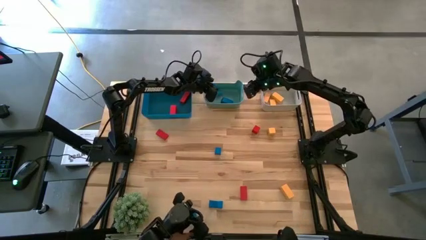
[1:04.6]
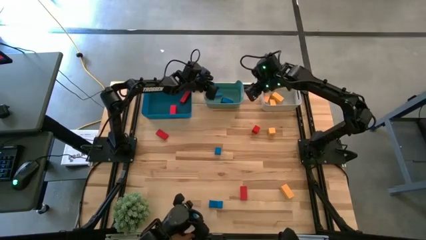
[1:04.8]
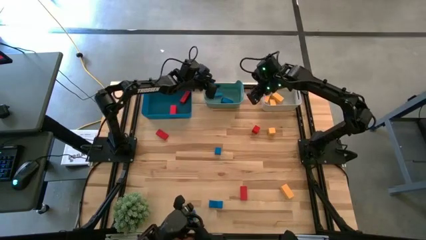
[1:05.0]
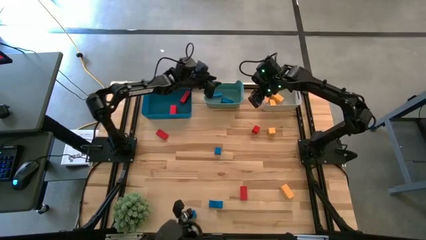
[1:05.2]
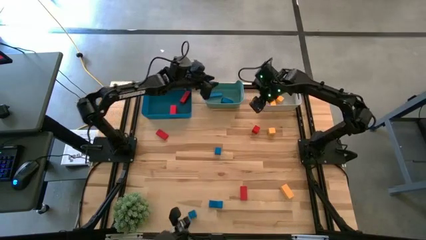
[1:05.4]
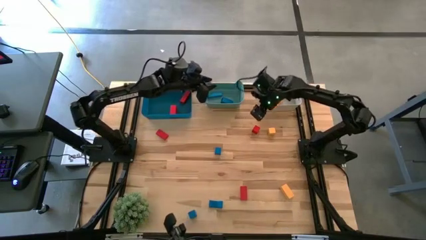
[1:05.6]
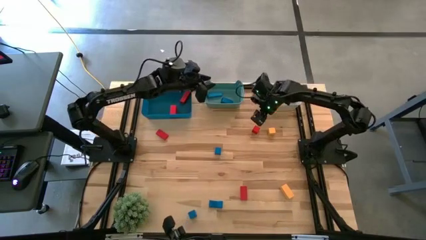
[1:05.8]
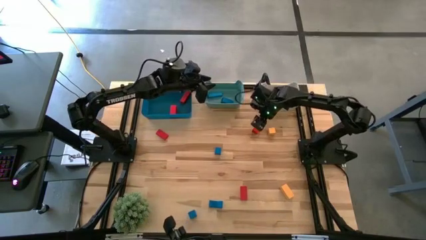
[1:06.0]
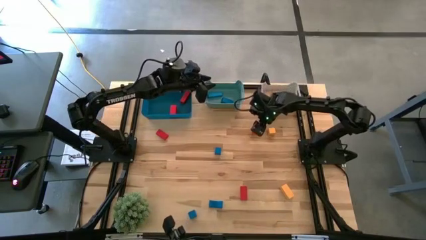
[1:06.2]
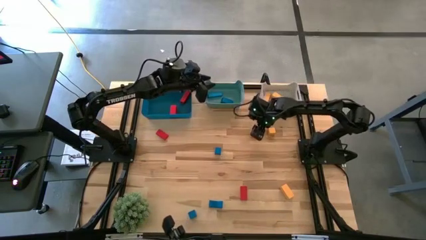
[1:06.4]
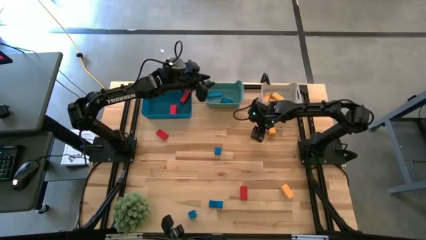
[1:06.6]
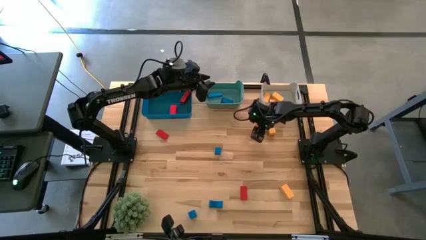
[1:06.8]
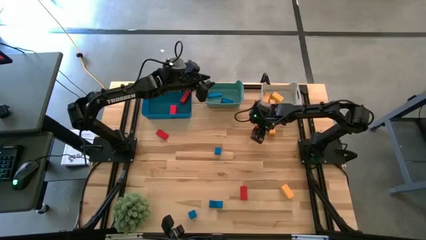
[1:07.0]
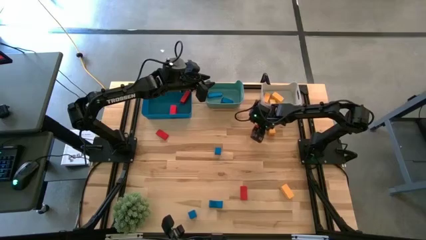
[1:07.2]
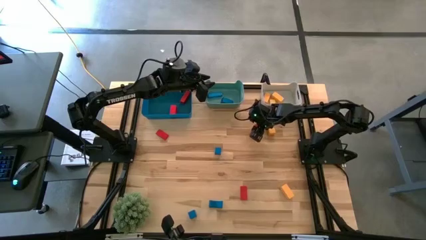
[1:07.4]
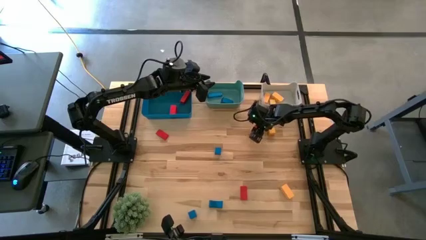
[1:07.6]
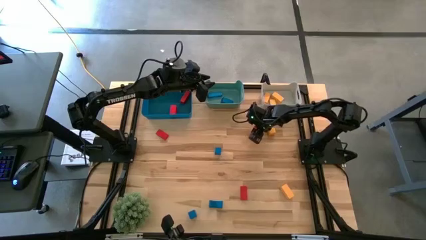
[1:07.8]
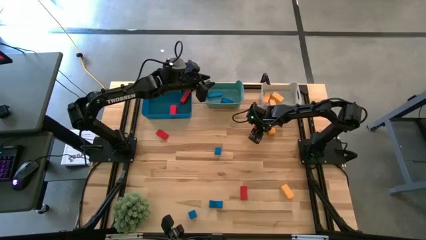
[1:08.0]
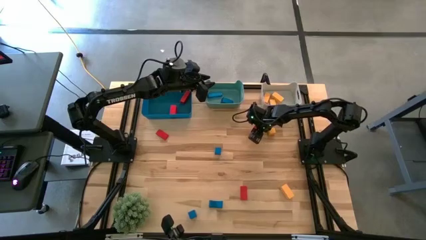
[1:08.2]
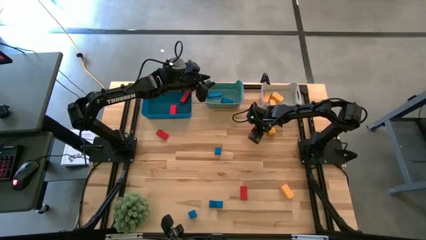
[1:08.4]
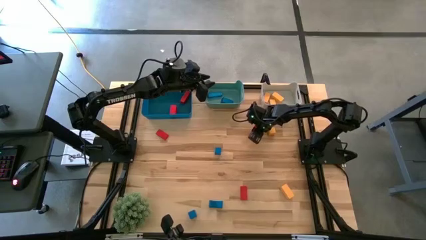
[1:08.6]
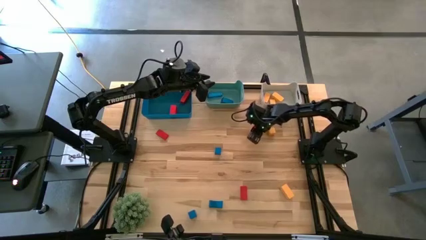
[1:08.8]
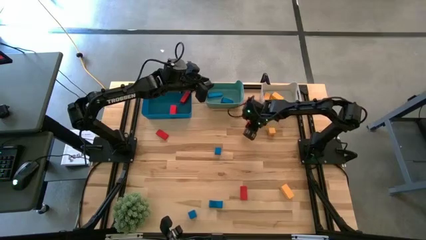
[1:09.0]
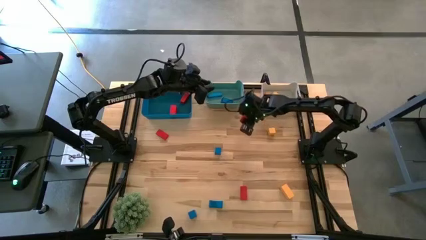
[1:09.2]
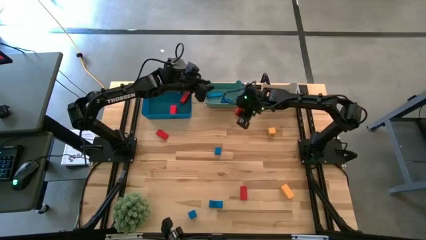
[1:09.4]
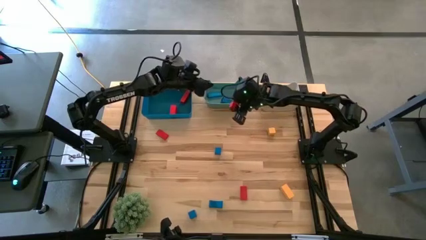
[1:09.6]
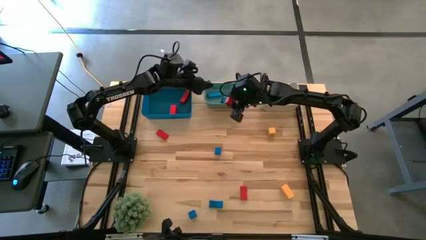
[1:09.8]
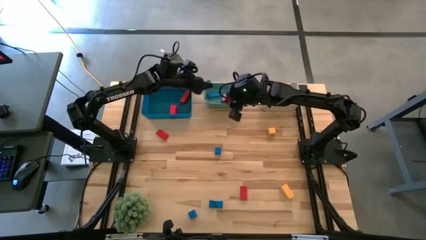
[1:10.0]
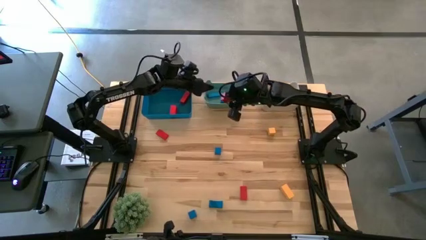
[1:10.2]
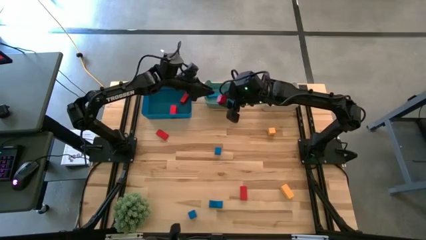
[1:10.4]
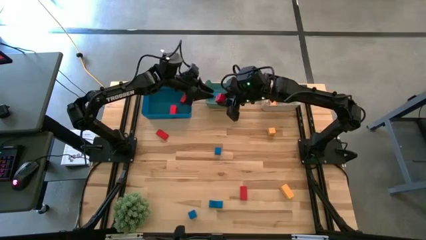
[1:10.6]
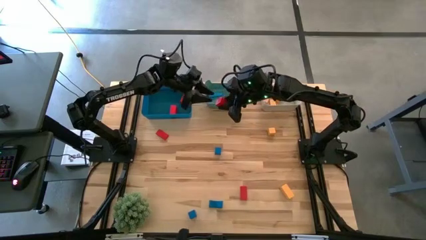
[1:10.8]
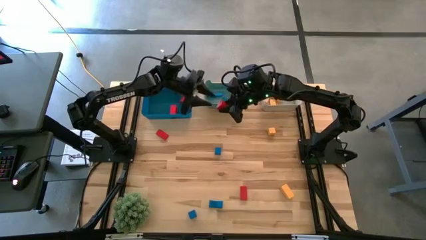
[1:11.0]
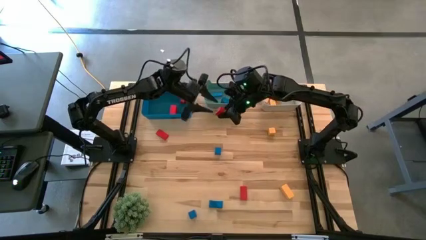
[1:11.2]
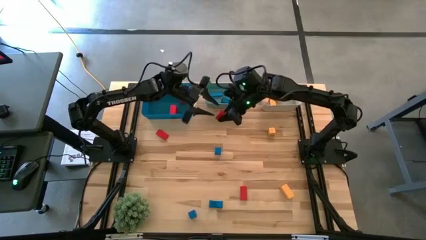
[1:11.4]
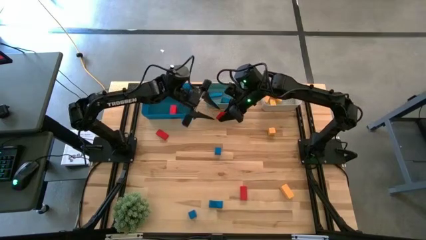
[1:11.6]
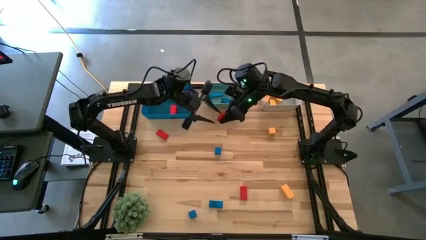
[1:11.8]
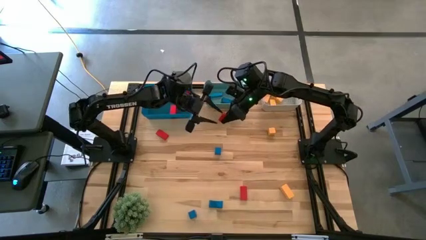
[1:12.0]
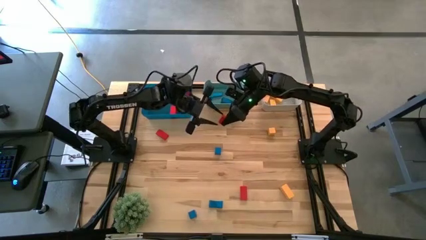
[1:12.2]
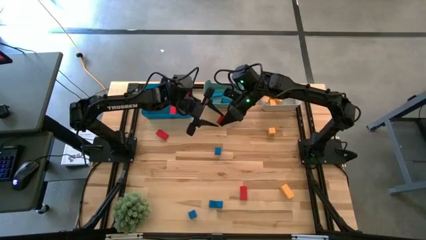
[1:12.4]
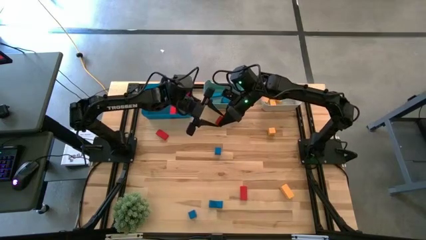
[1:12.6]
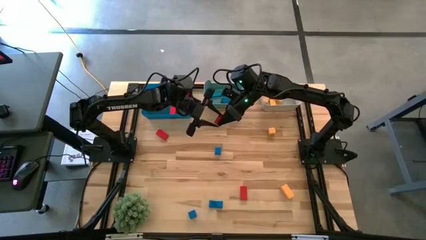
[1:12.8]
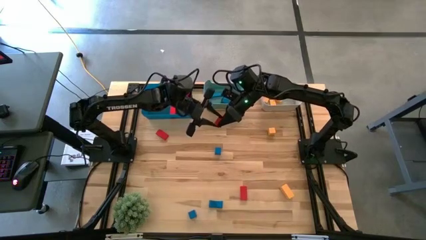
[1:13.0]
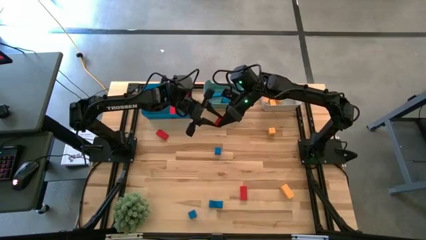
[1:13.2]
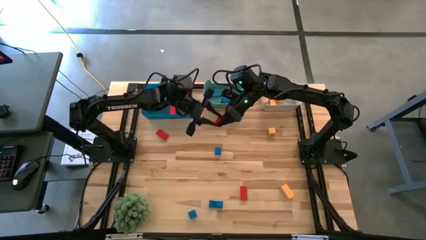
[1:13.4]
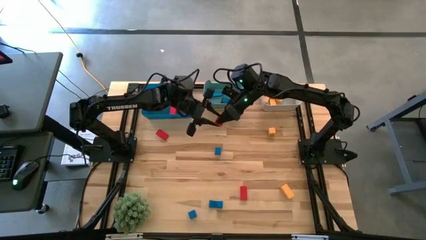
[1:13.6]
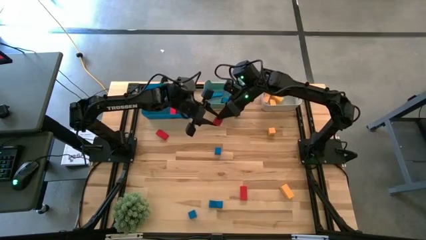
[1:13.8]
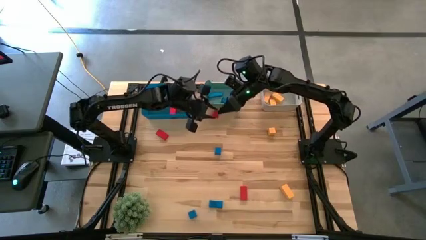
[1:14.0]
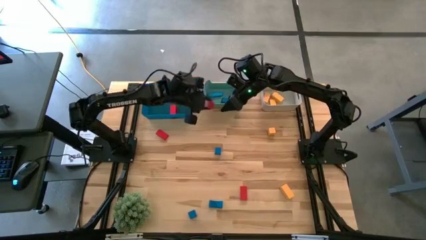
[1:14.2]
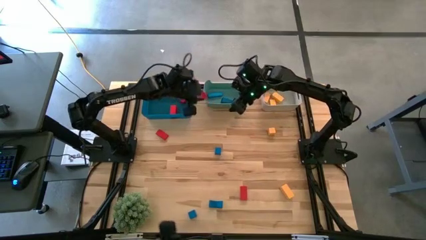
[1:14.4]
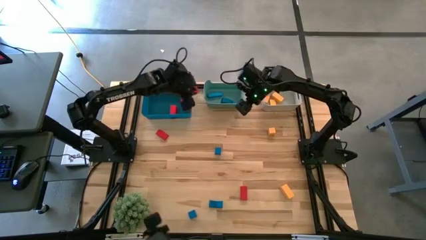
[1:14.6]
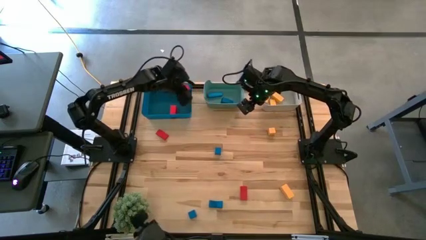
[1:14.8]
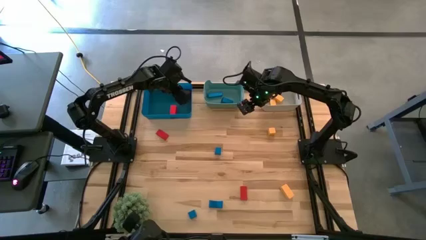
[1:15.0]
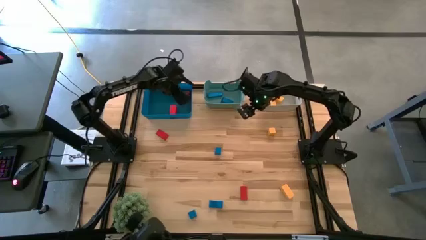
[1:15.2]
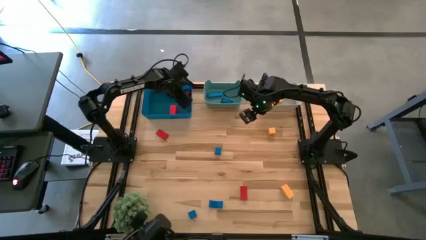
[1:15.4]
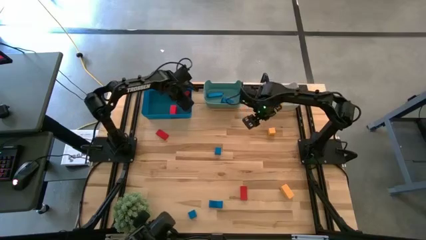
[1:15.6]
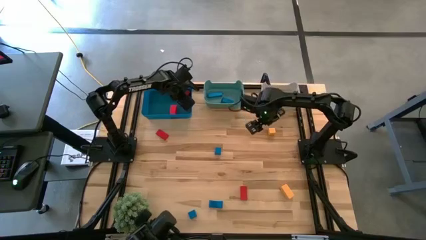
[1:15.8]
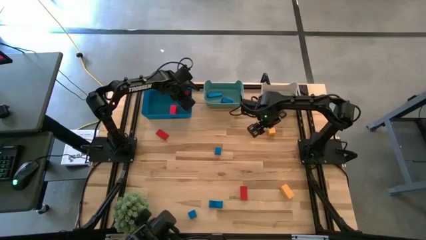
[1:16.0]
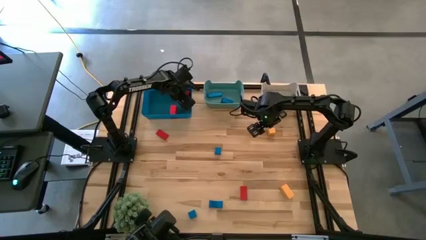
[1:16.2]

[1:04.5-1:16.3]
Task: Sort & place blocks by color
Put the red block into the blue bin

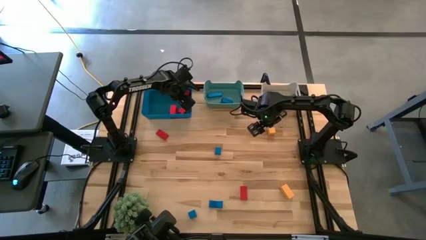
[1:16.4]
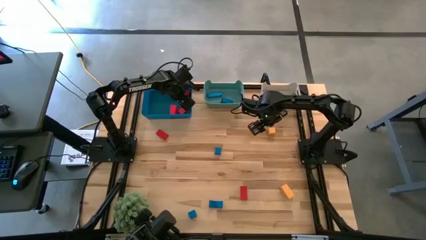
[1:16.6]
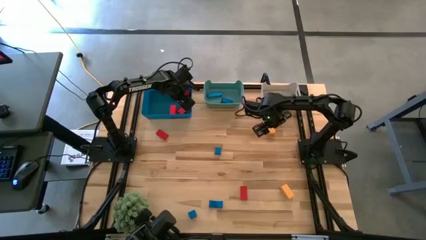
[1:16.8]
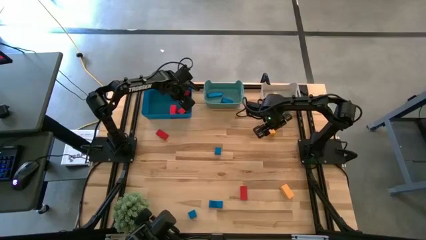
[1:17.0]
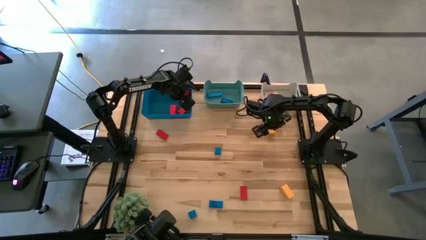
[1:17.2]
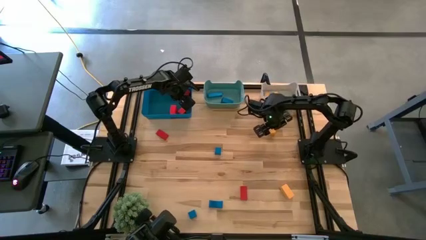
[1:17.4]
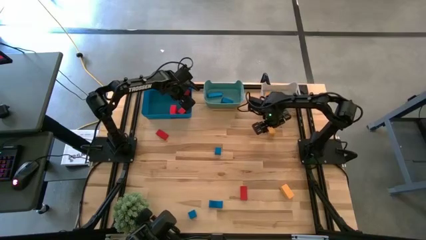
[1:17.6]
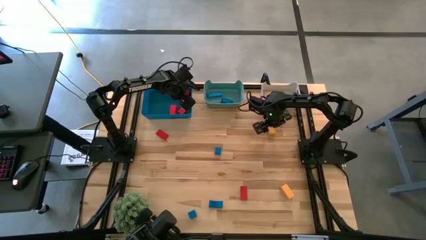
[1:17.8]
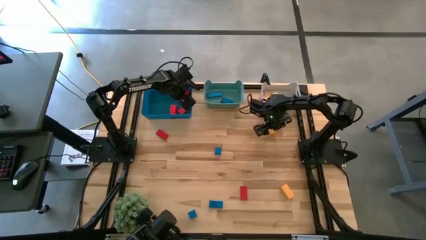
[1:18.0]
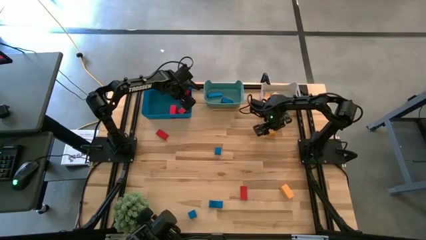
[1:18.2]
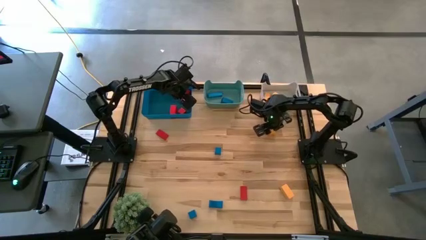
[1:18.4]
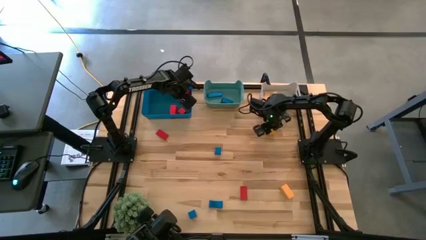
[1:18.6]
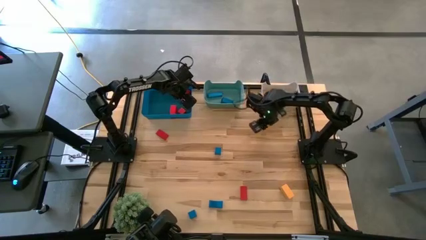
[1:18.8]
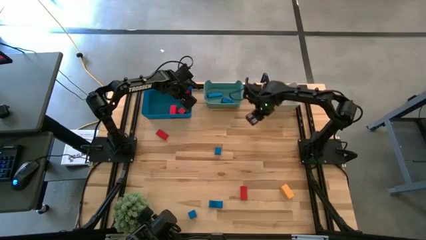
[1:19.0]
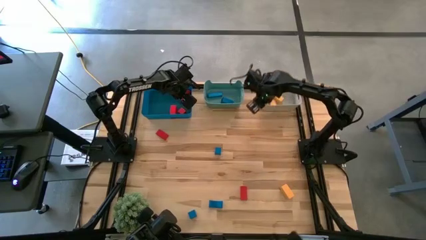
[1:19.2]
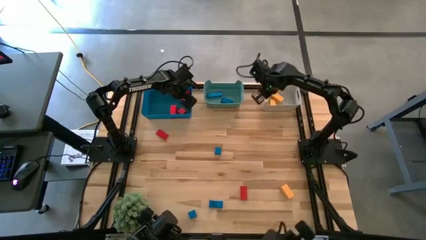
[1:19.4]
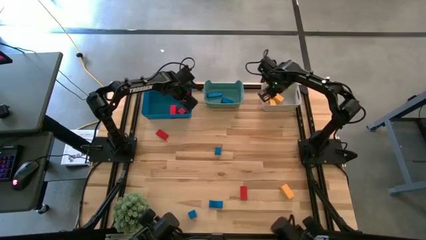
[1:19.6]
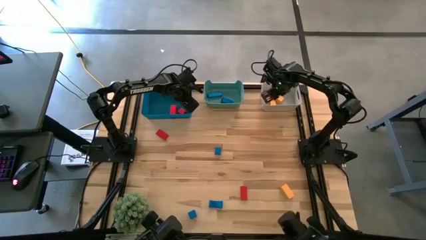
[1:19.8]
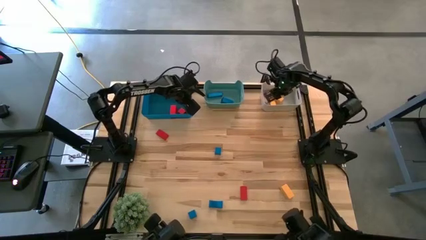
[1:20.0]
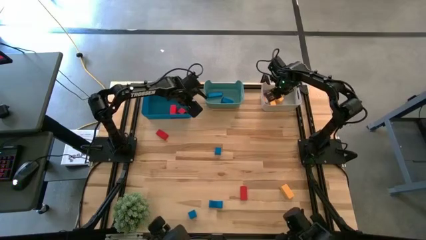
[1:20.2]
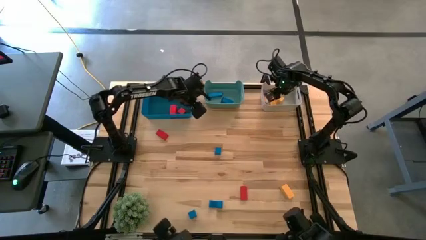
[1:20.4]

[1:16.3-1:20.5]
Put the yellow block into the grey bin
